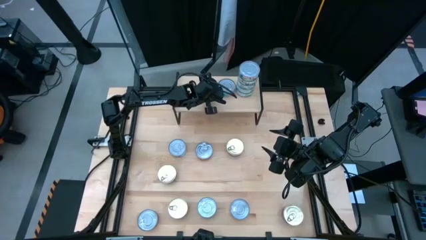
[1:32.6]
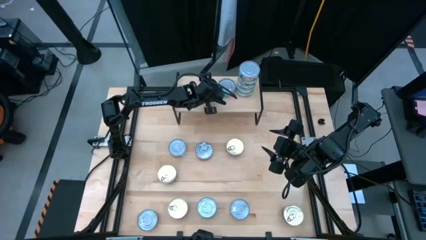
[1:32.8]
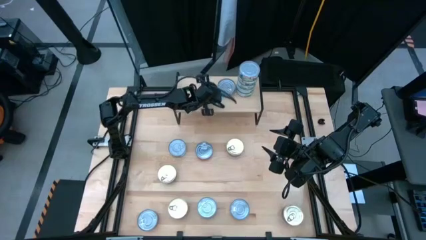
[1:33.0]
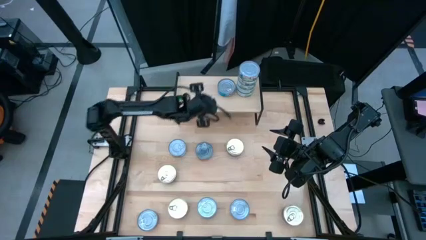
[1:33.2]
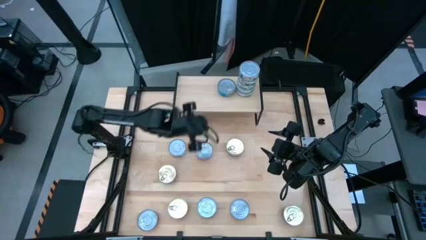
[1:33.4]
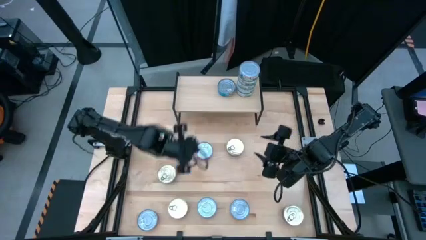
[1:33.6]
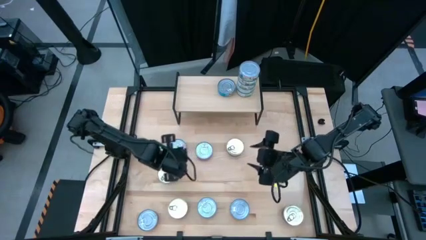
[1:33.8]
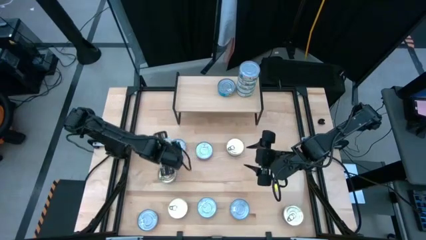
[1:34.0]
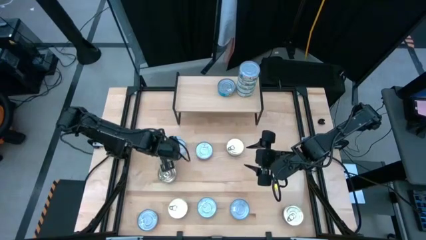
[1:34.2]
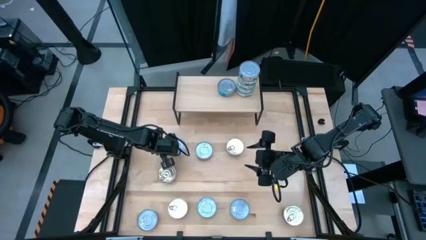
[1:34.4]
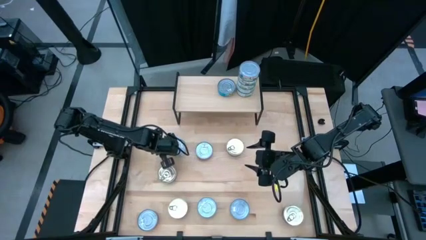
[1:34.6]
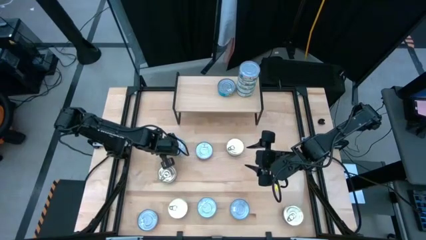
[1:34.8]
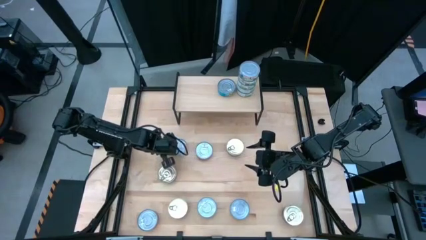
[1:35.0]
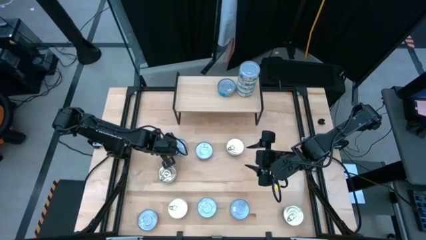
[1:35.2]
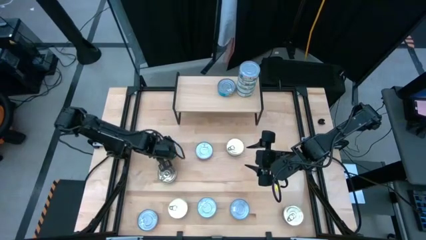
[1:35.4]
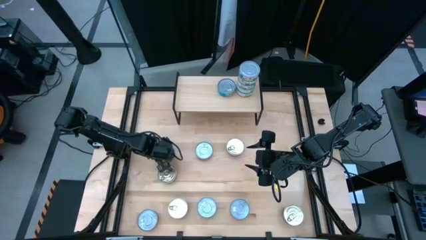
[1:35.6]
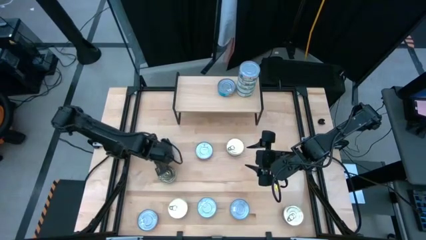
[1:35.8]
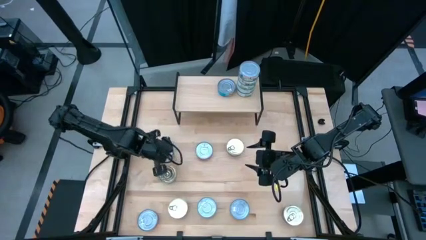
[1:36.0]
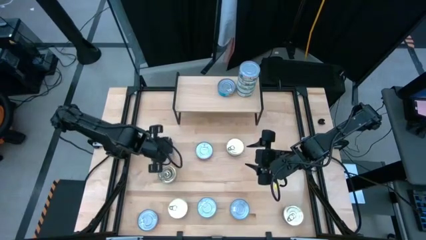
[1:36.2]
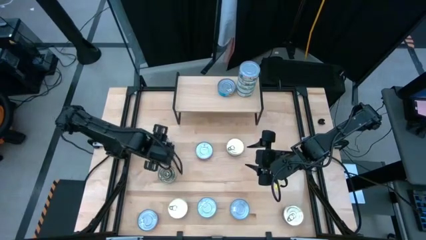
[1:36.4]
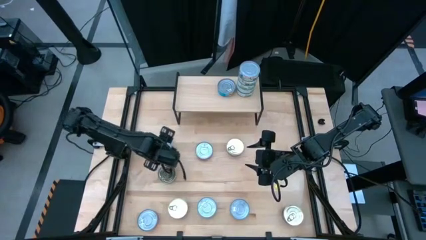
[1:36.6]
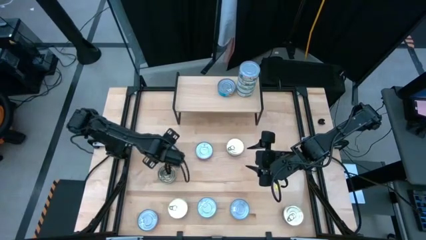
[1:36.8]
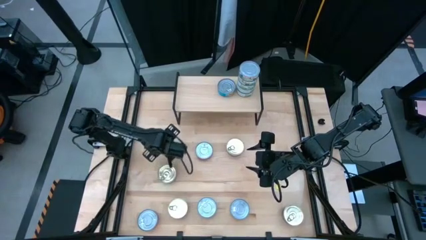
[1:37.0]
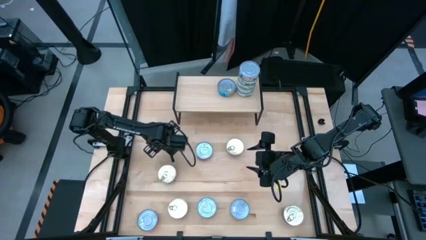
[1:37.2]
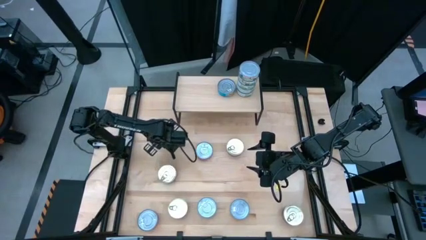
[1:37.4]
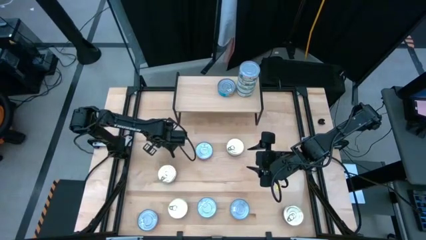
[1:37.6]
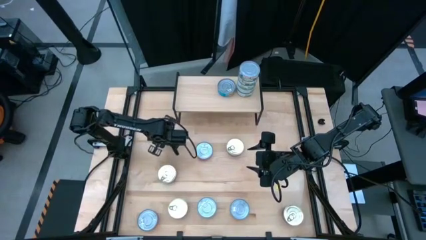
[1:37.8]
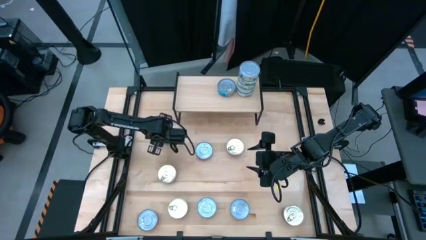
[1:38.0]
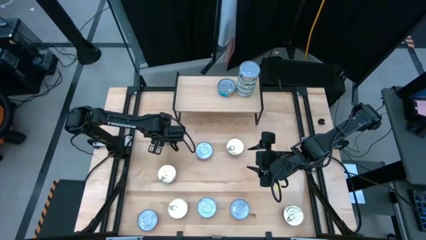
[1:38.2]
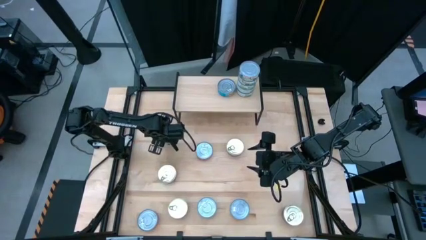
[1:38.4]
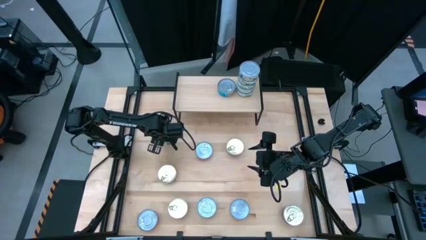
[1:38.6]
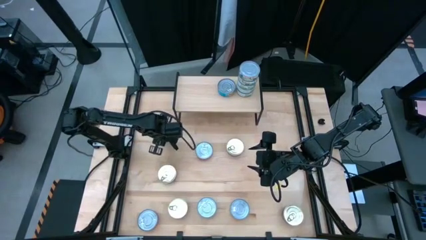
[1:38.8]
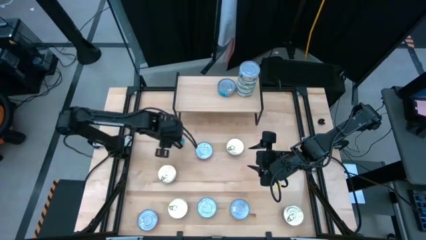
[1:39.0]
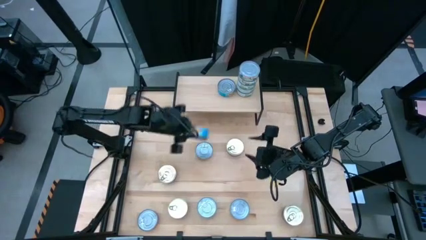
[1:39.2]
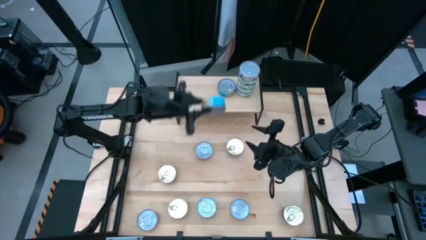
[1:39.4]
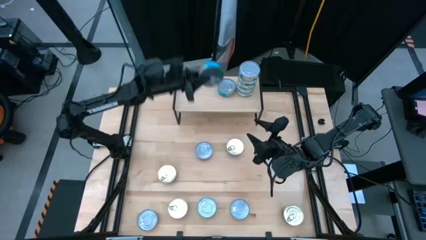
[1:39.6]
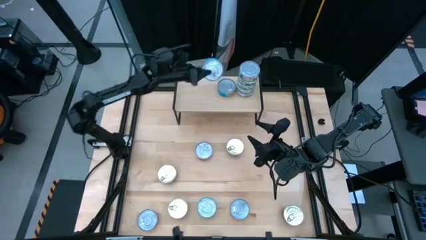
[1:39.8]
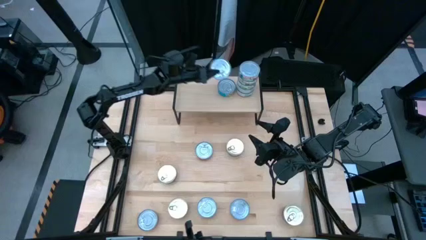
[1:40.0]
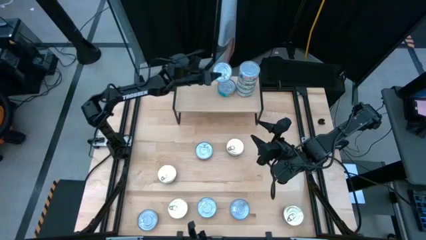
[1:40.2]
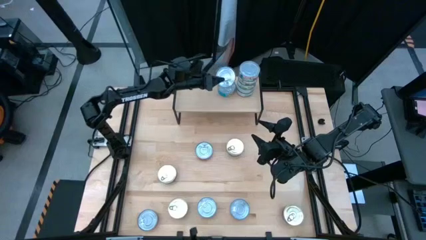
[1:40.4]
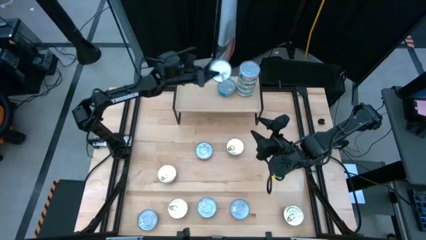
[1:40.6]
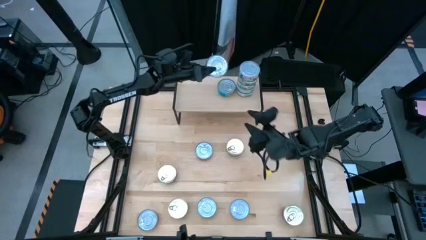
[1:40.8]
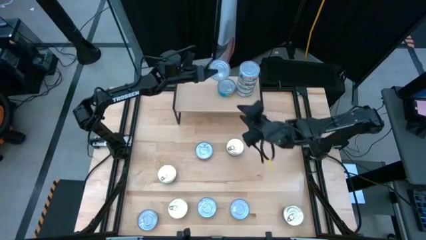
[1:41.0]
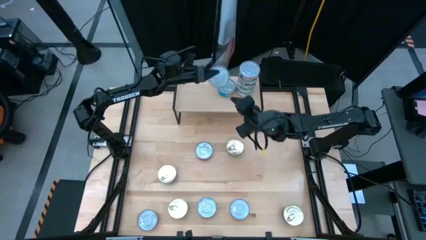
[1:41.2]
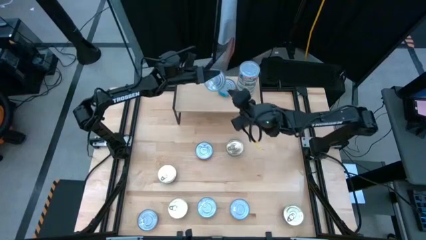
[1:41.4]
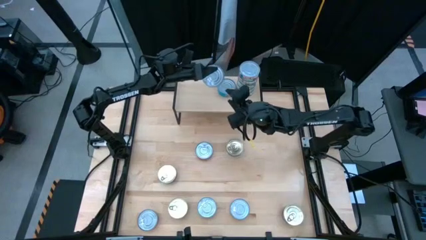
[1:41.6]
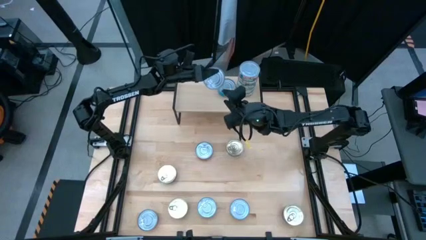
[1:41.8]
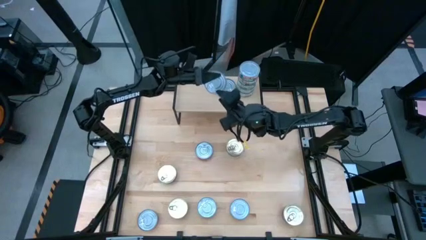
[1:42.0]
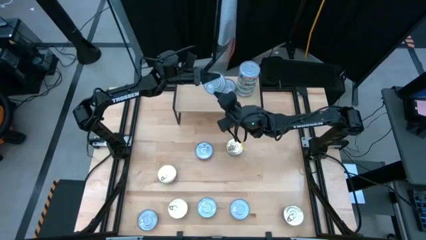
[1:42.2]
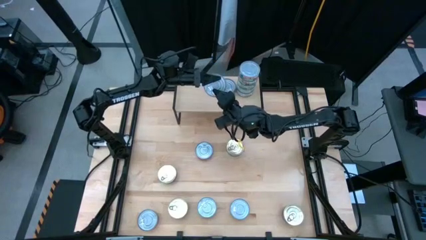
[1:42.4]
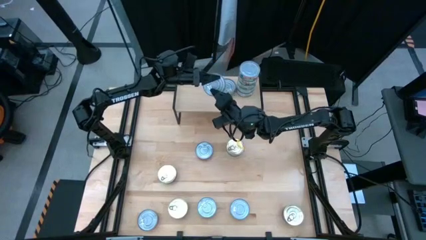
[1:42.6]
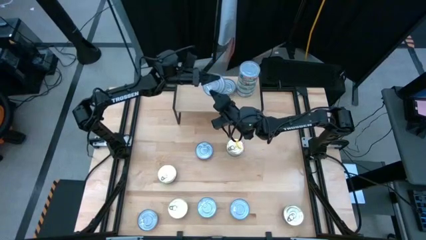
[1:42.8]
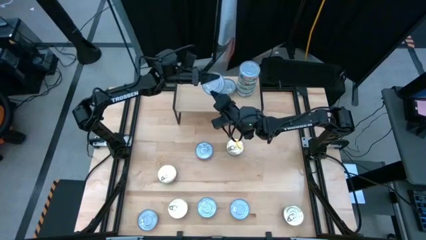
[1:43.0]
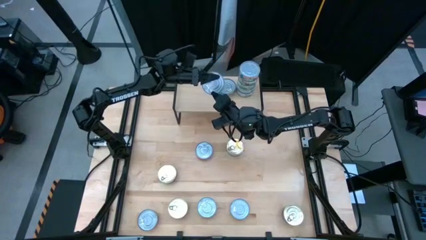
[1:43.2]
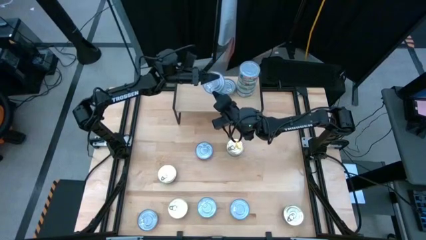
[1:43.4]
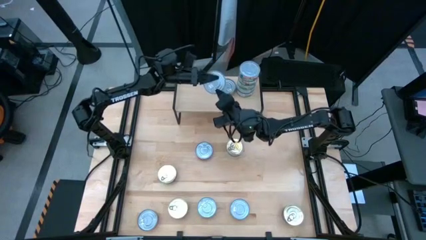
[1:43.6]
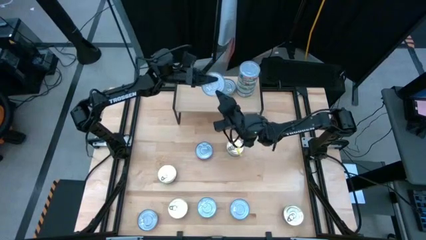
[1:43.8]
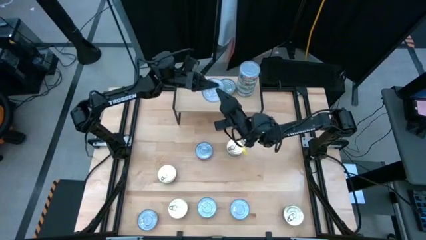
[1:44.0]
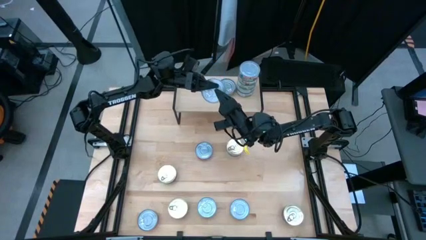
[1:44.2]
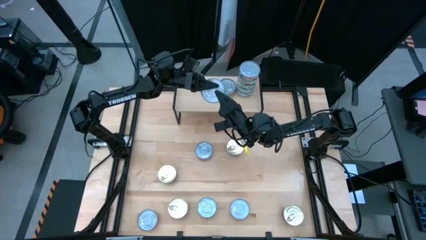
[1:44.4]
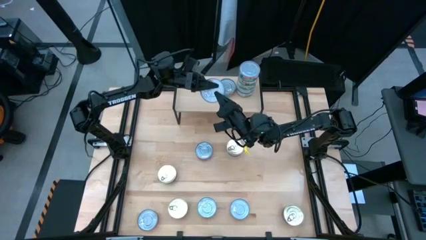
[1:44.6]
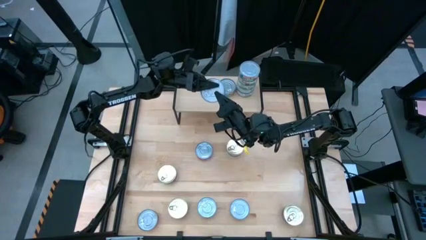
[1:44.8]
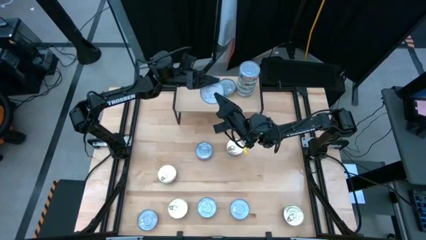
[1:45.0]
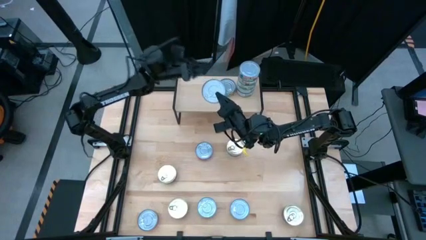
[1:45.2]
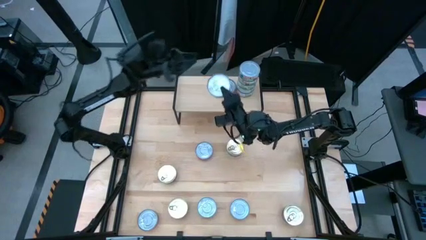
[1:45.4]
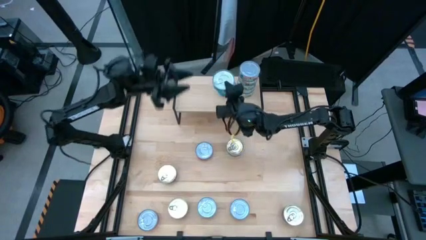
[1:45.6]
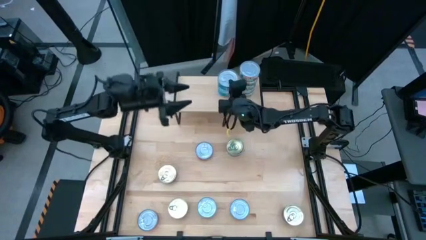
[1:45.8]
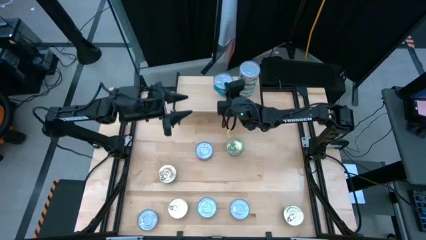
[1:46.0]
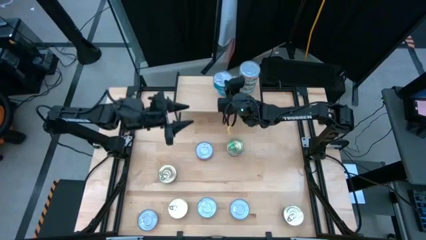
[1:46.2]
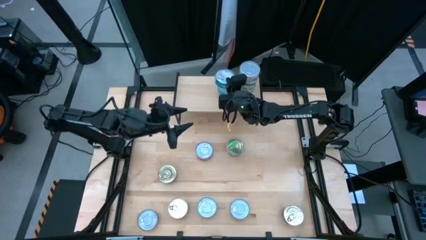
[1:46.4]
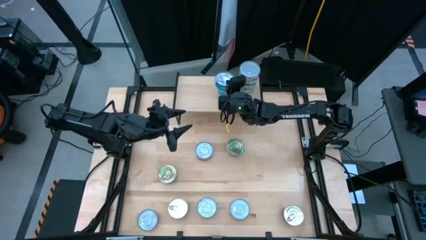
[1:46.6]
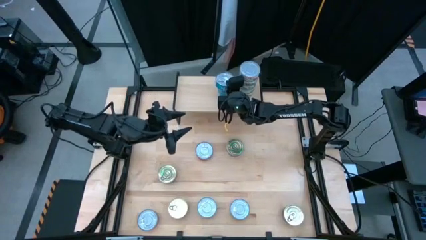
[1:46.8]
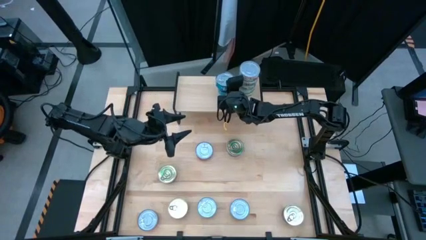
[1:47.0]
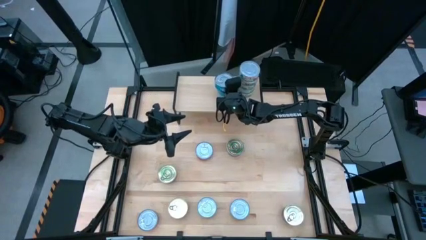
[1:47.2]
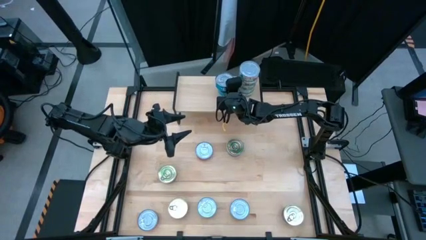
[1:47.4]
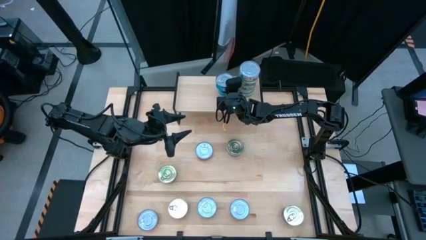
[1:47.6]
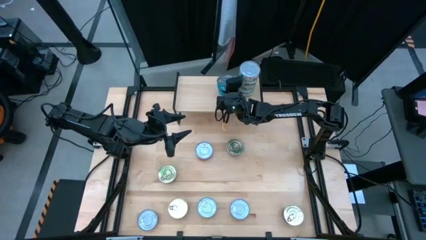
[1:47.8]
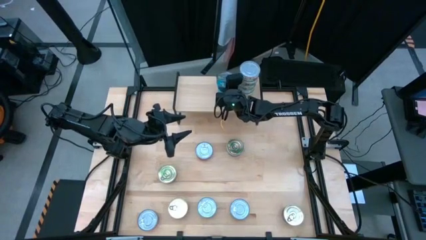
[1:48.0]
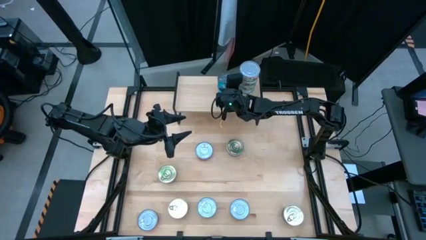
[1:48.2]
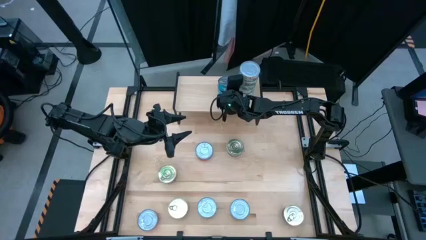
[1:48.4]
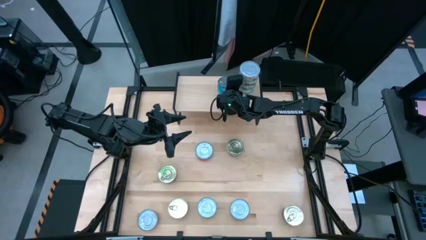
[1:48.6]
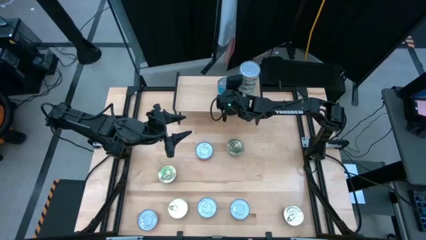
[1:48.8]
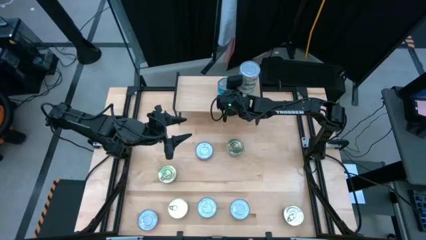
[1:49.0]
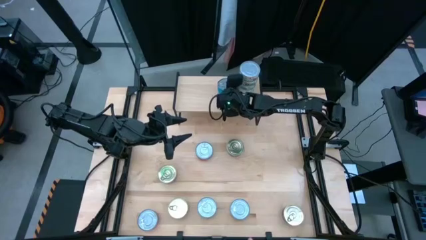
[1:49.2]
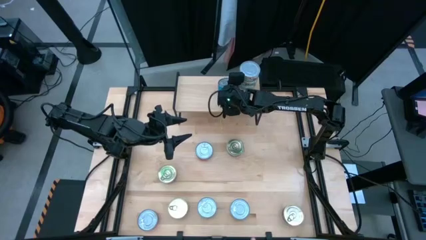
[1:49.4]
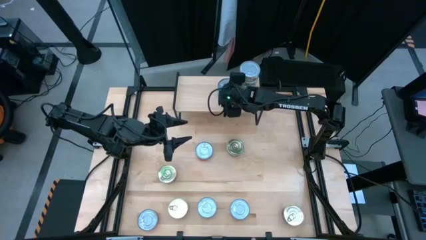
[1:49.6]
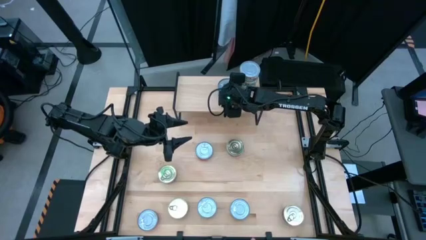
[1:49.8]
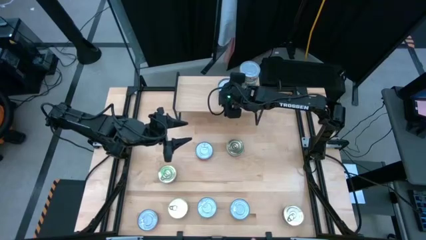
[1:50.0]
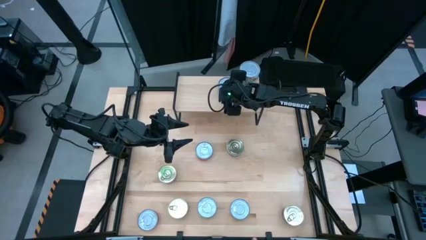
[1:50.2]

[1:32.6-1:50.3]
Task: Stack canned seafood by type on shelf
Stack the blue tuna can on top of the other blue tuna can on the shelf
